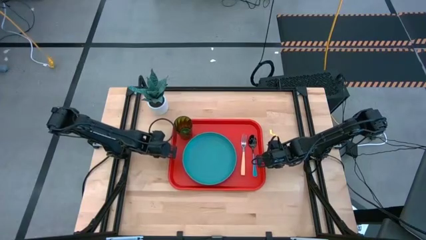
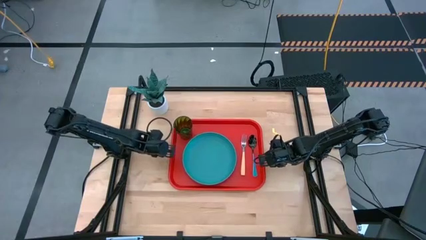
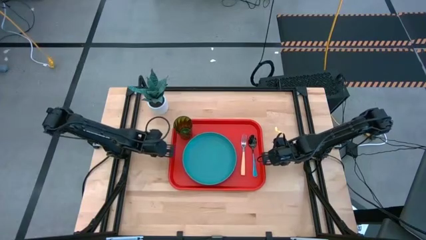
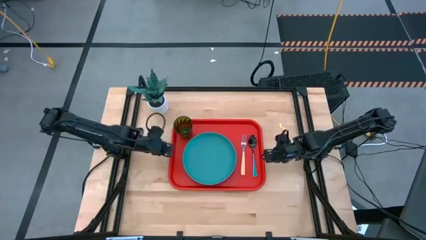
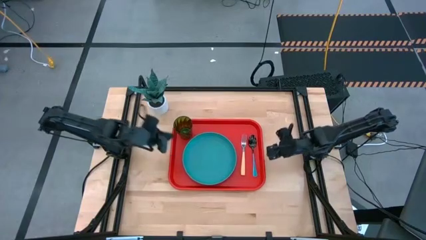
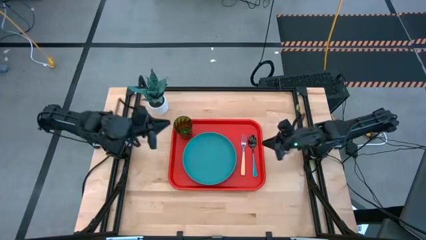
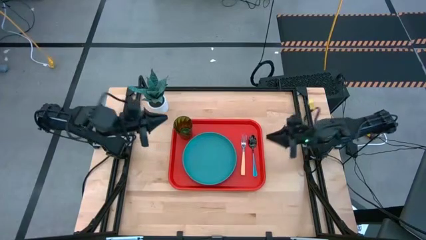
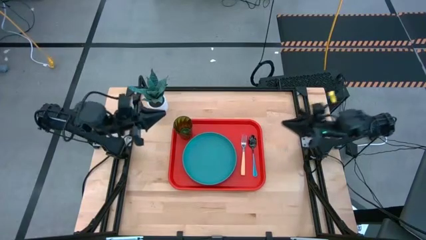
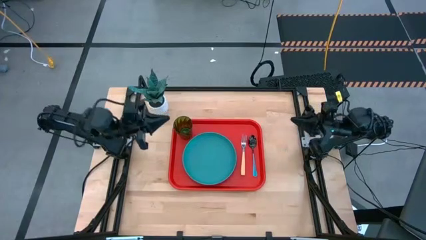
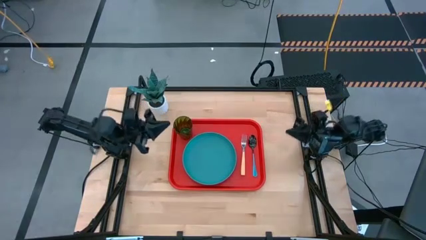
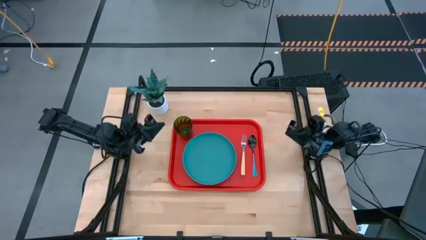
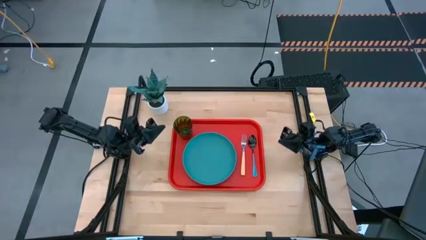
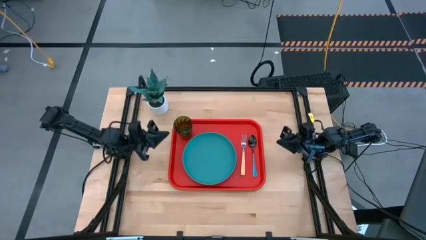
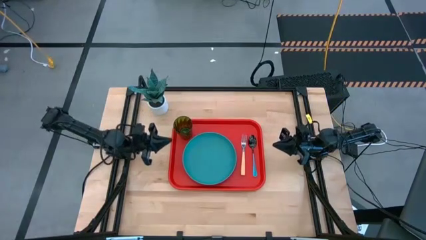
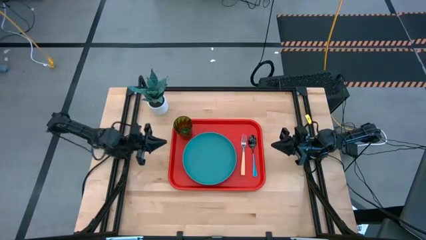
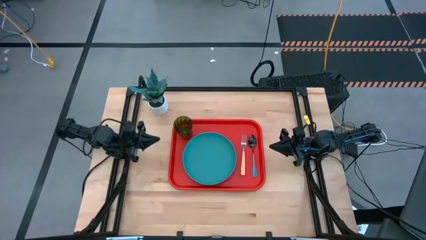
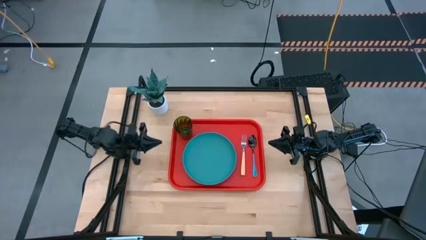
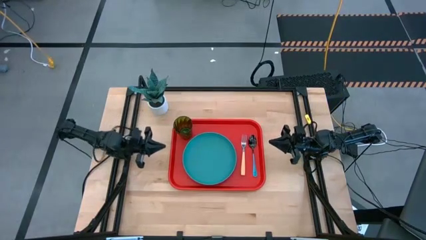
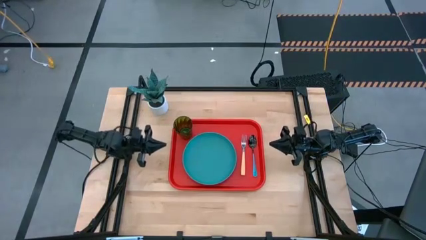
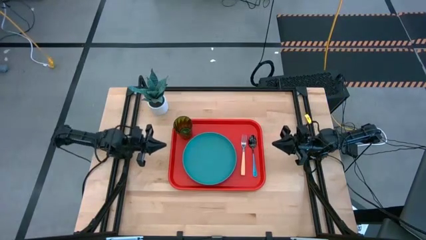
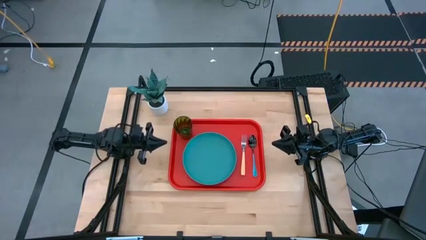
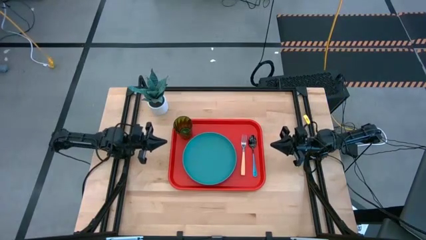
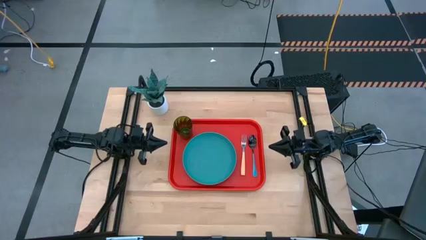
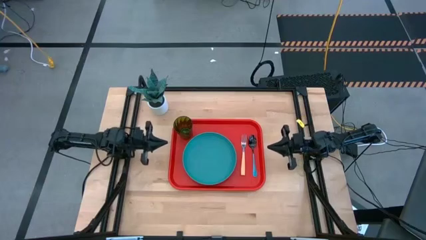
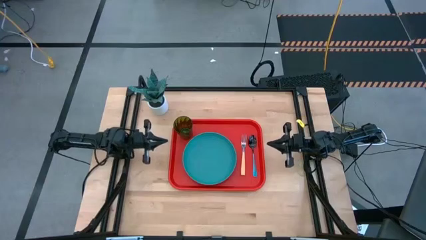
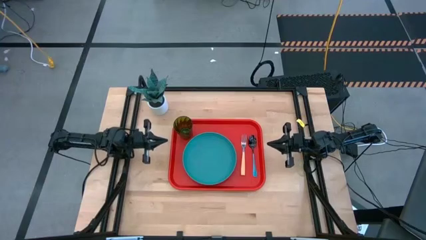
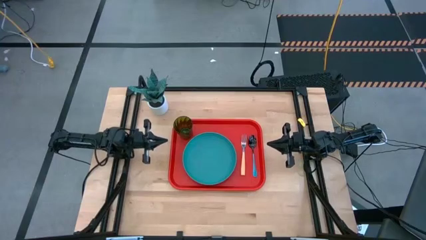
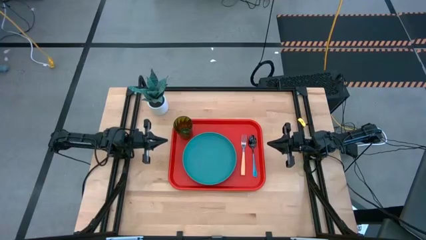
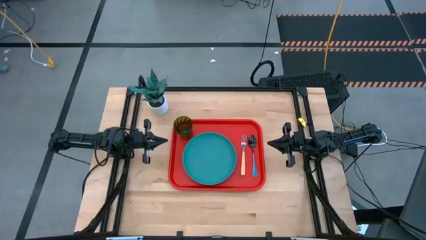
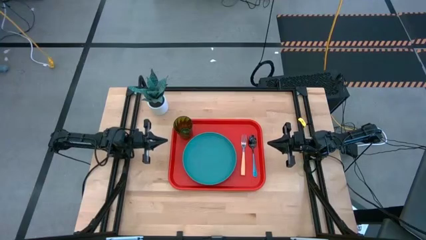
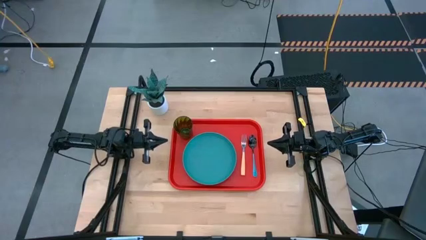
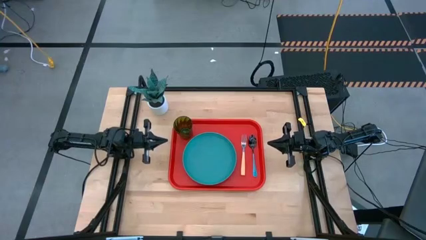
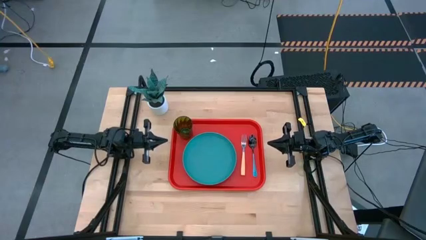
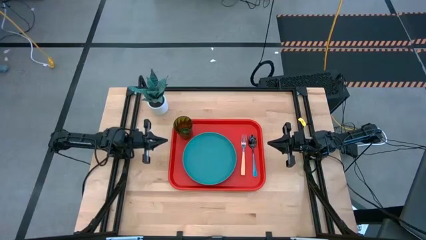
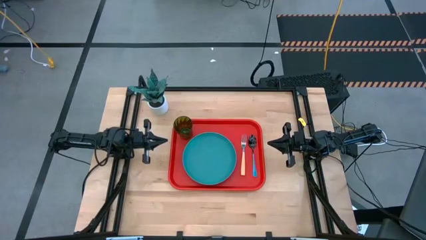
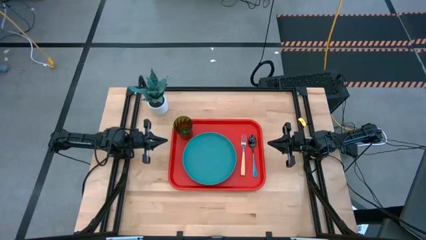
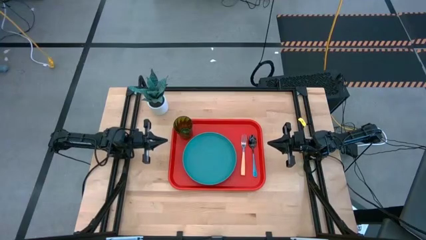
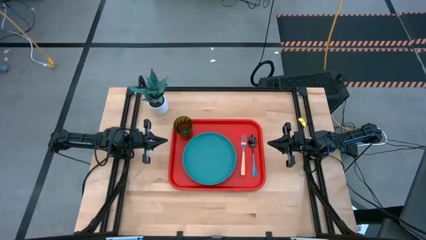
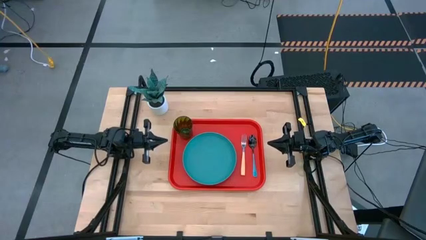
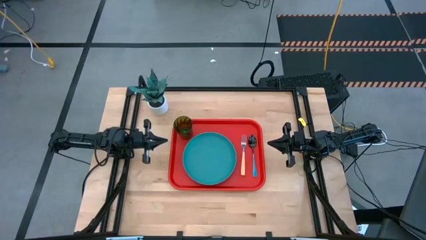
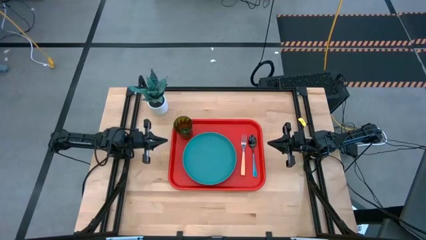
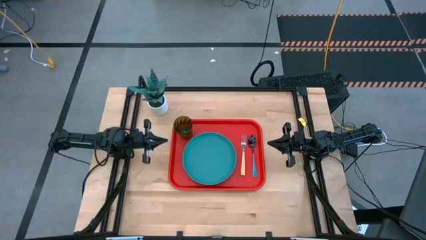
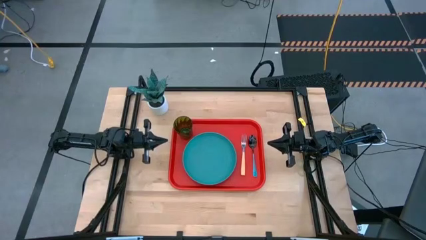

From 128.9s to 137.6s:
Task: Pick and place plate/cup/fork/spoon on tray
Return to Home Position

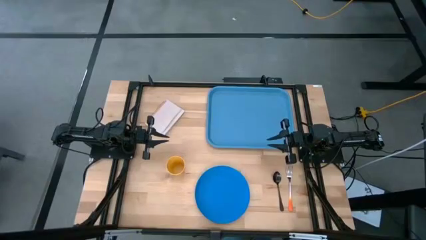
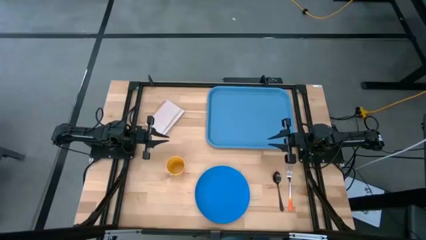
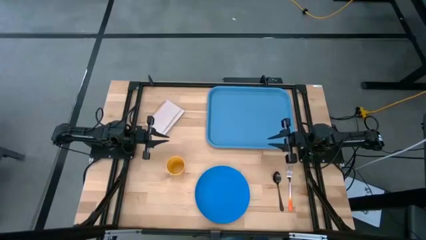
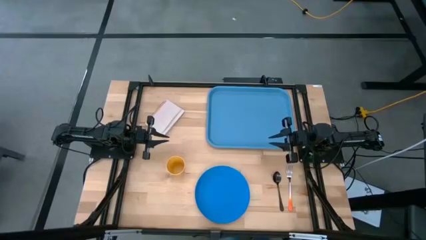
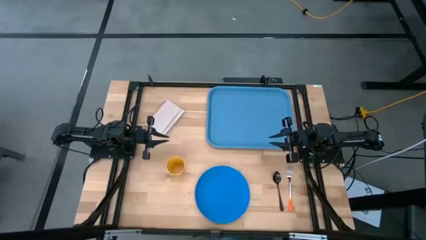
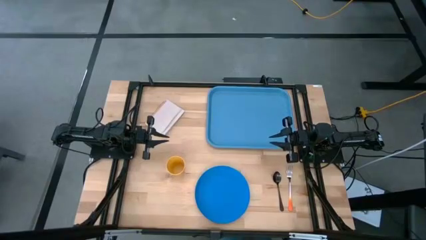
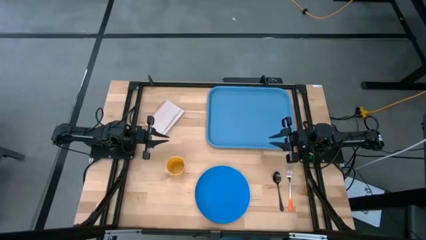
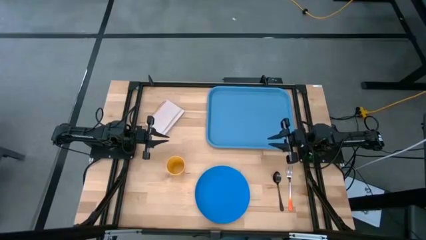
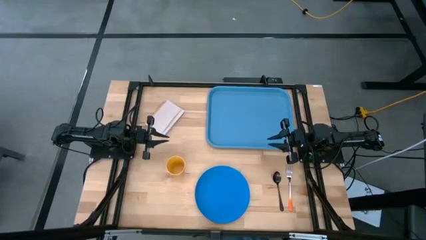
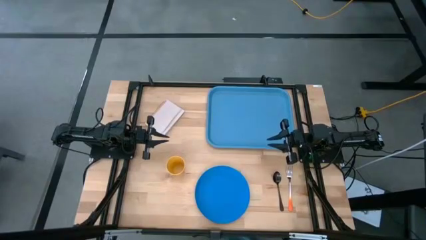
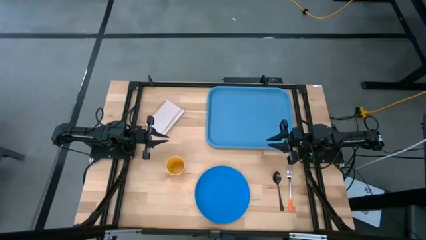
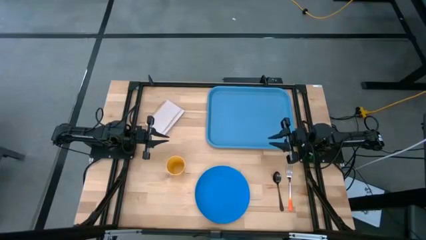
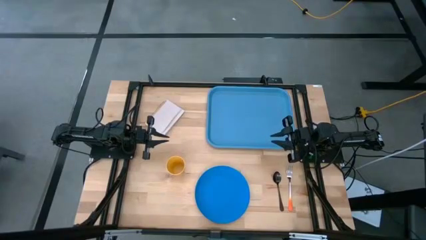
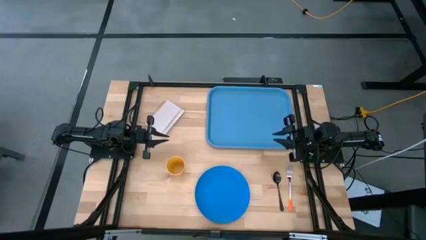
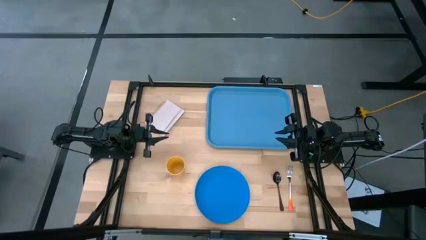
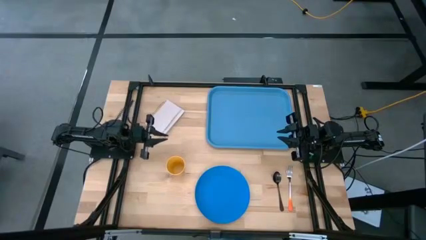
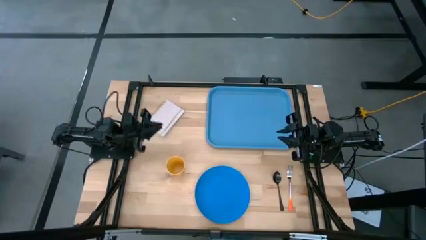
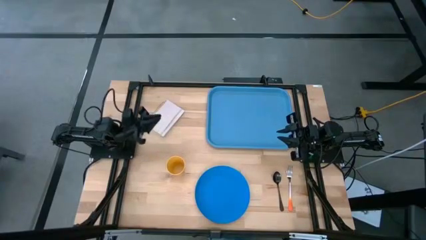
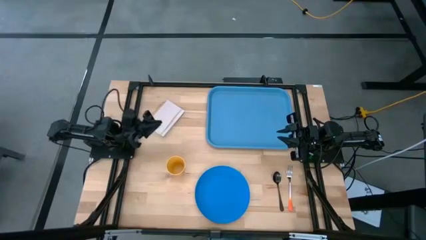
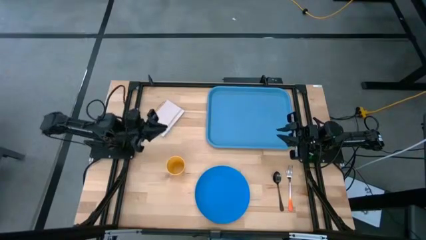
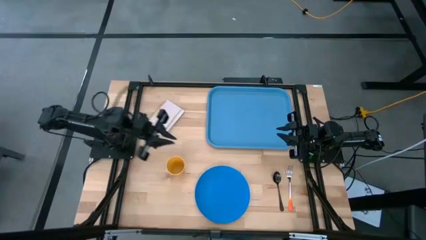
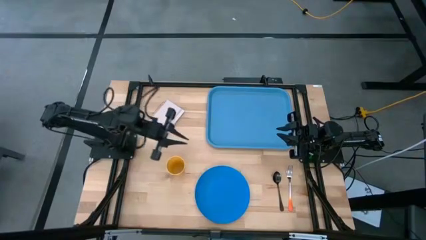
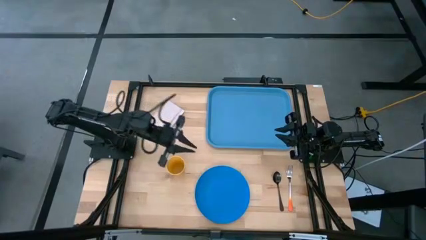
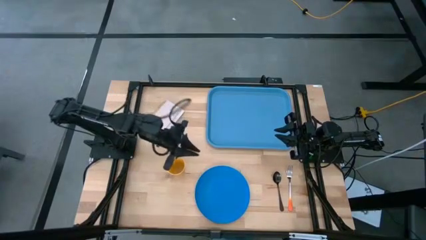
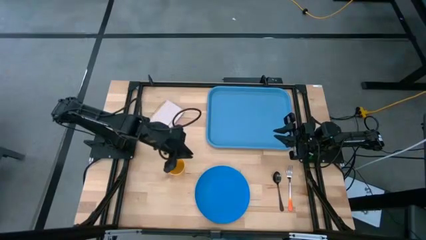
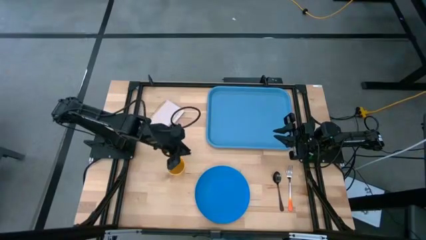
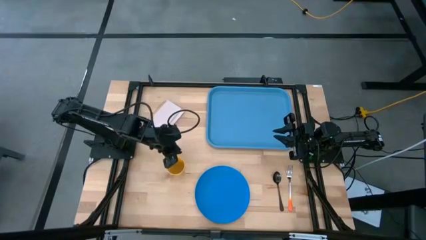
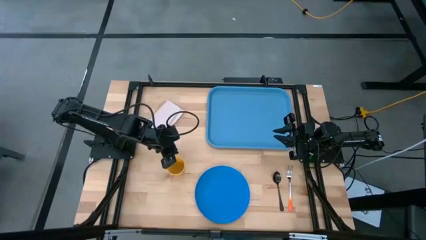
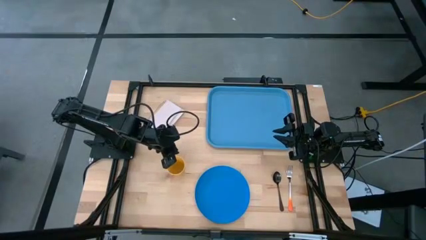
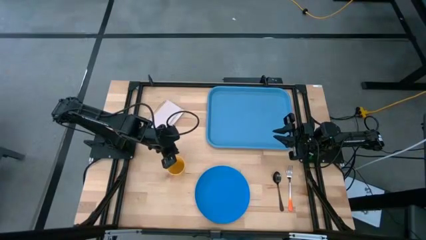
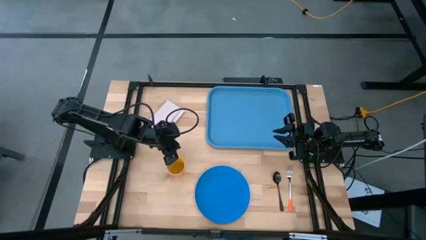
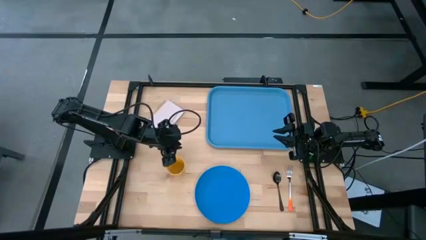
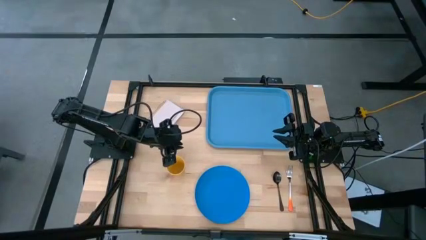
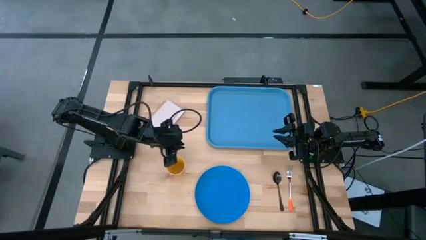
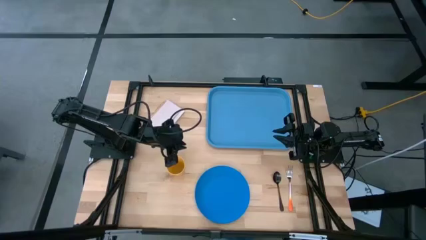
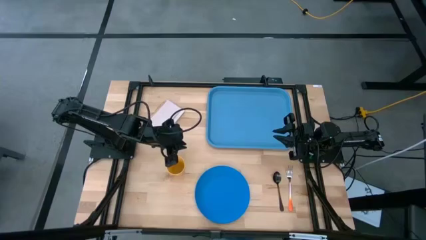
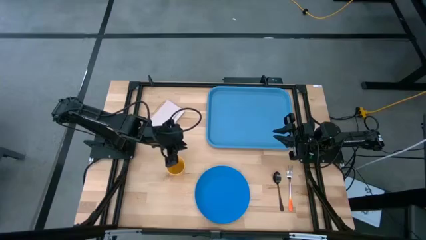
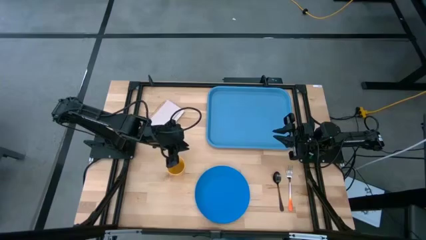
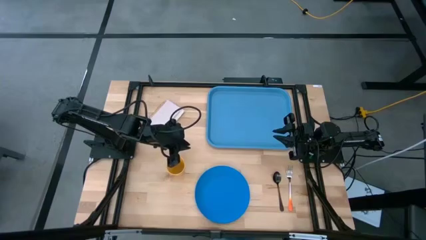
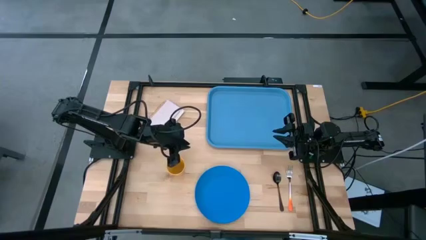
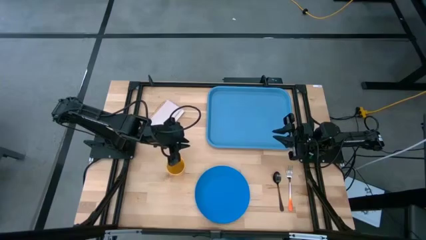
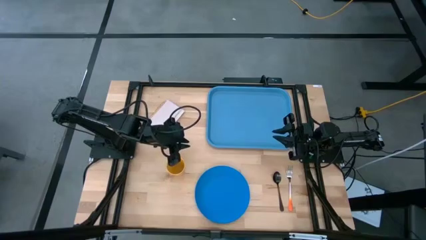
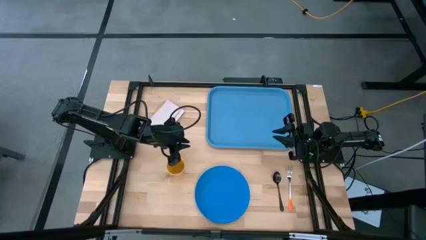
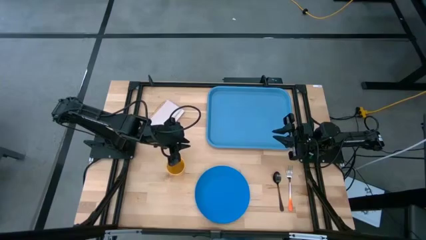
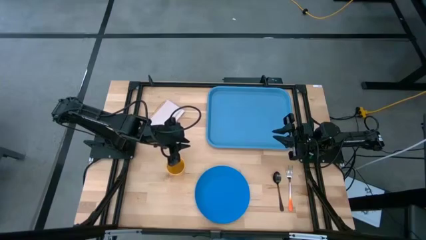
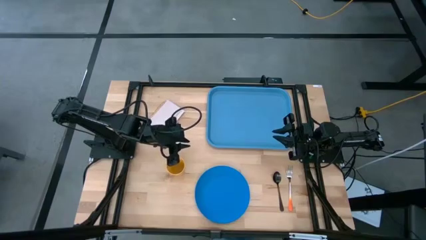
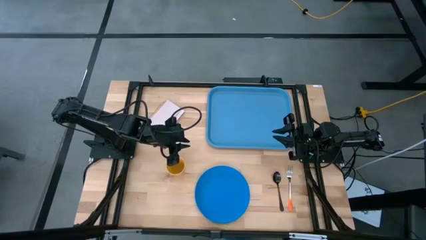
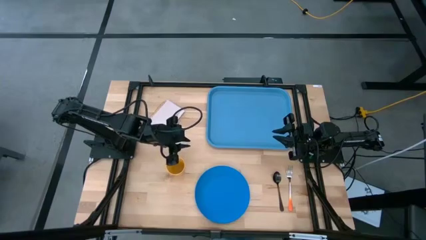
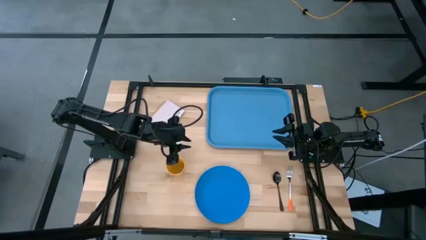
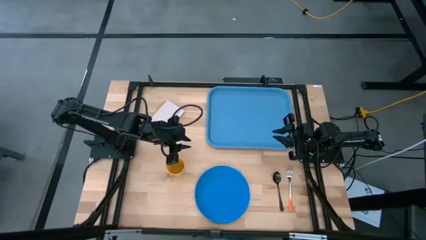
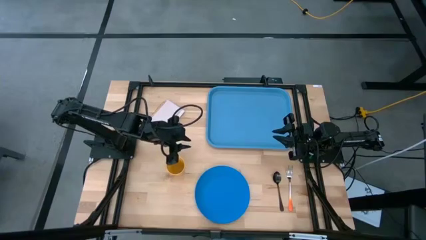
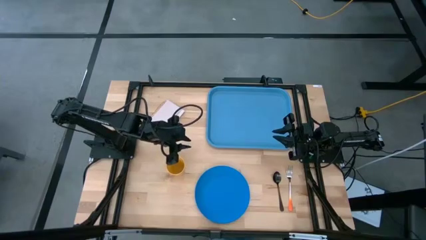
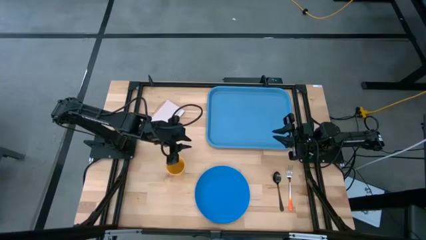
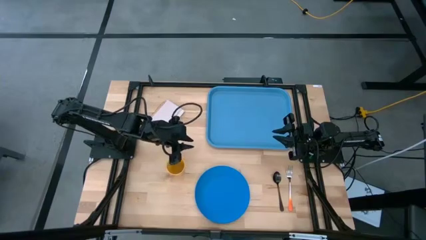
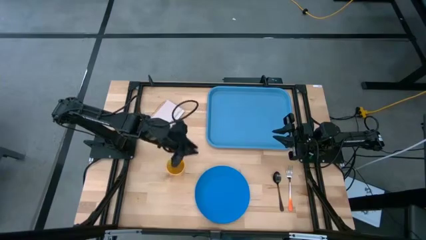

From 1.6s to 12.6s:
Task: Pick and place plate/cup/fork/spoon on tray
Put the yellow cup on the blue tray
